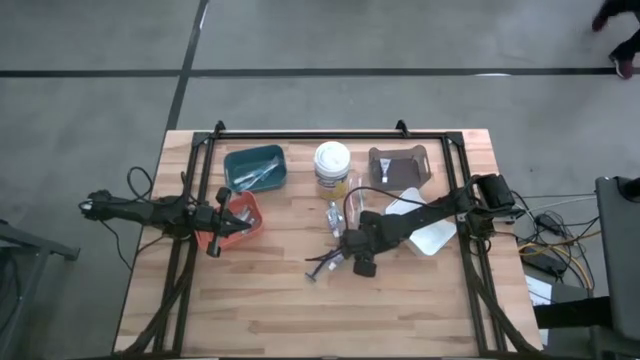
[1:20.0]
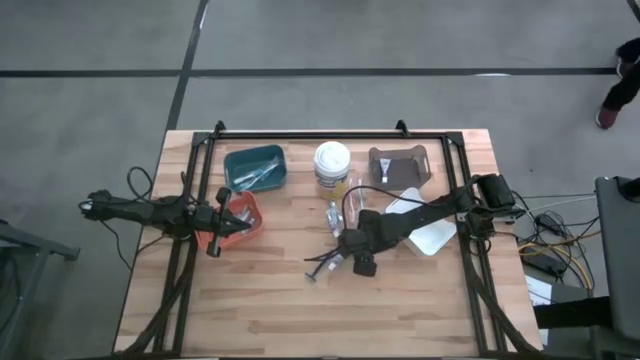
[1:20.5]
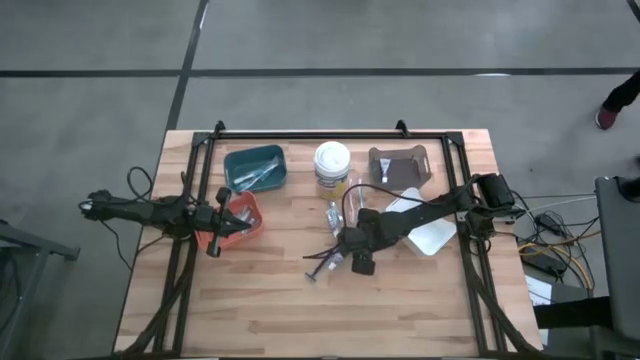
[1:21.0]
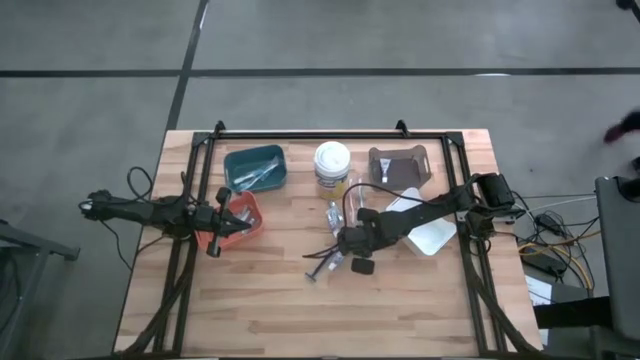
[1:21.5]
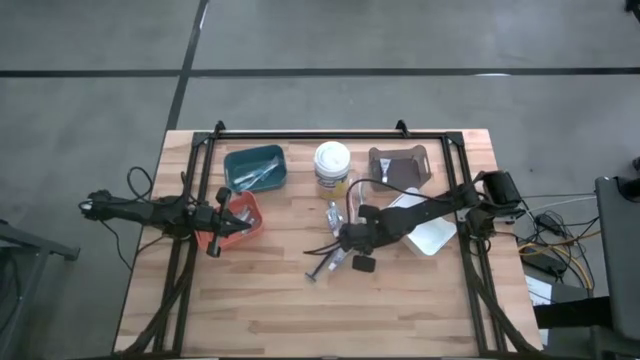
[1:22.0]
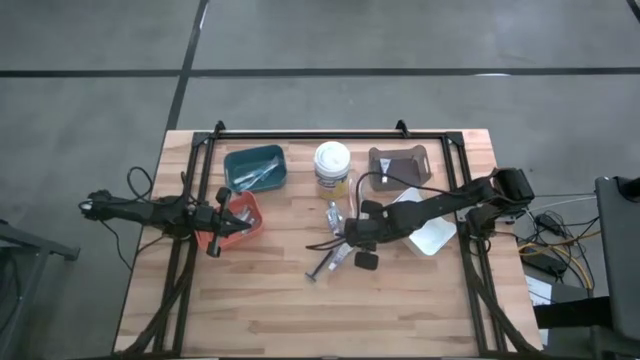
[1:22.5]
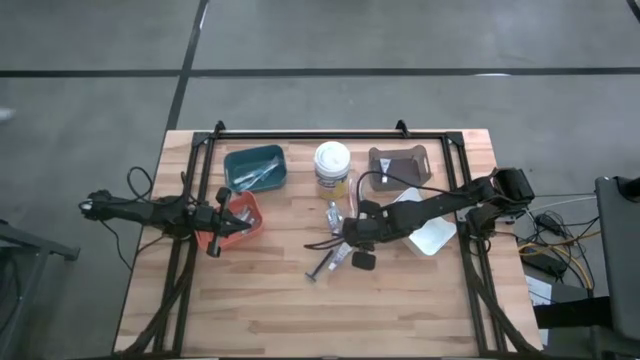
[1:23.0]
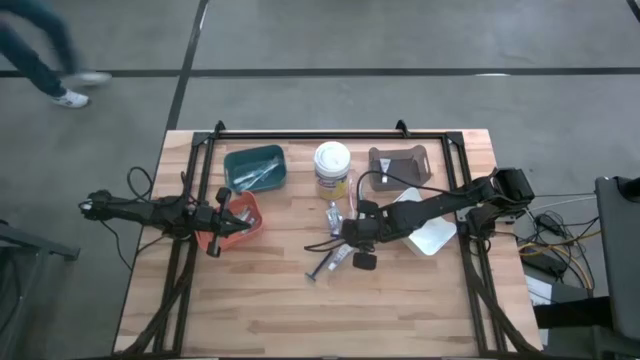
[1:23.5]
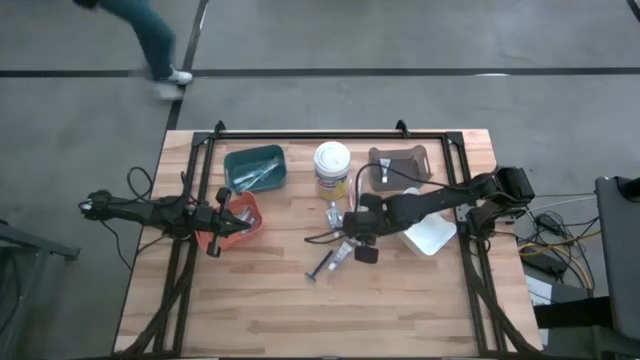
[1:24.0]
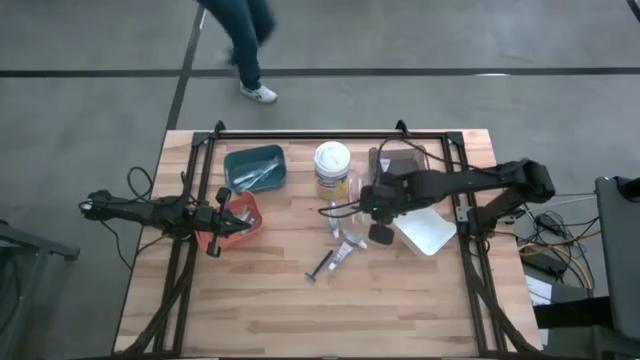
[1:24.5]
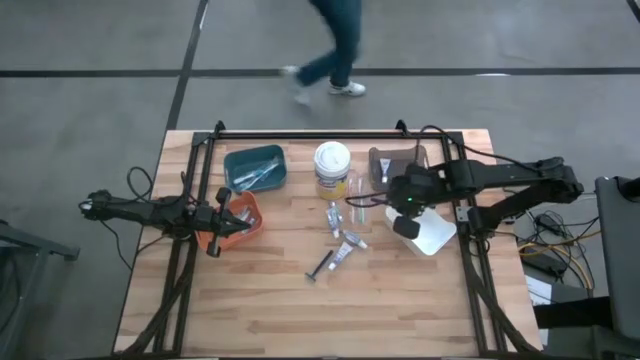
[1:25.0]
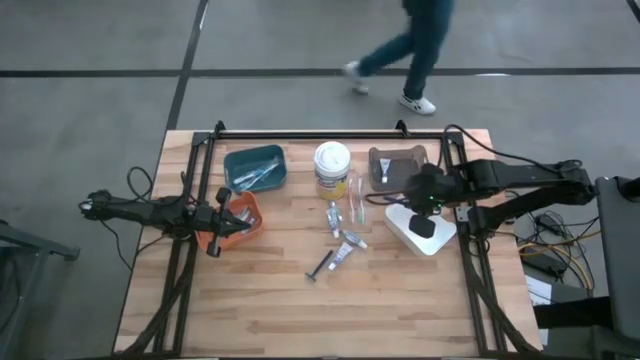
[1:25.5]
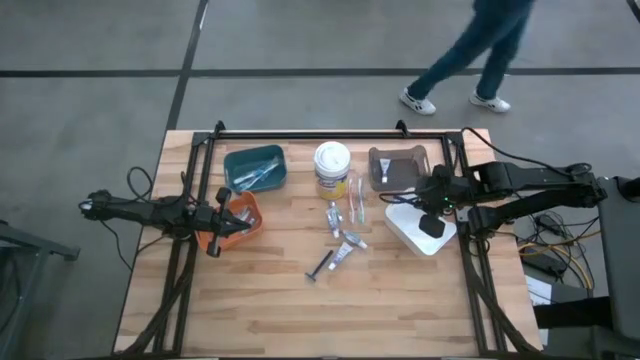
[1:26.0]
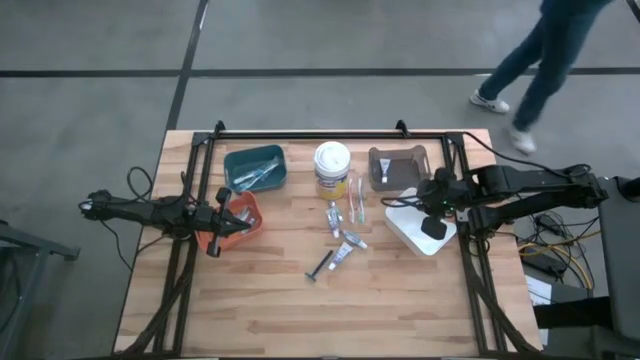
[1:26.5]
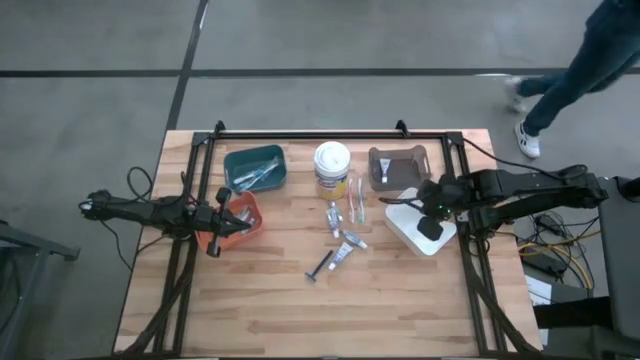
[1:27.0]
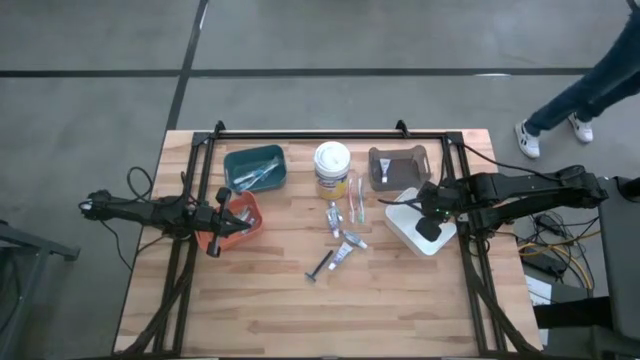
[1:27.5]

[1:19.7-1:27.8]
Task: Pick & Place Travel size toiletries
Put the top razor into the white bin

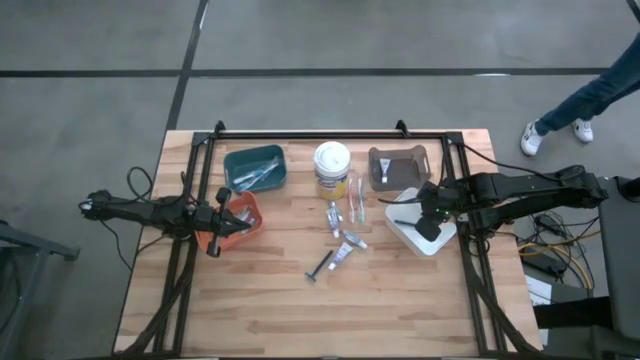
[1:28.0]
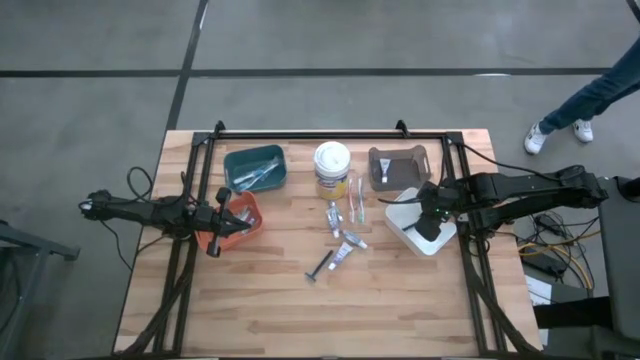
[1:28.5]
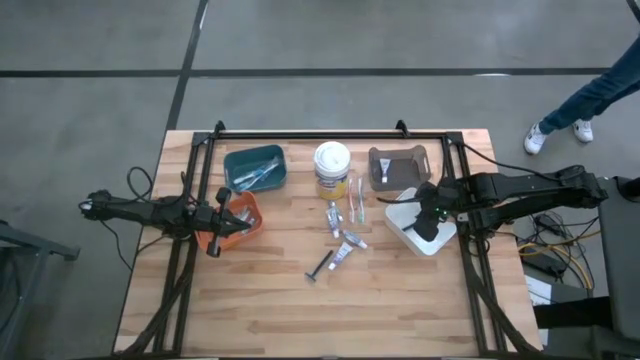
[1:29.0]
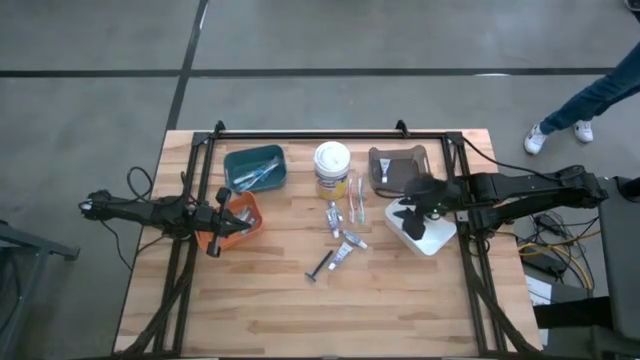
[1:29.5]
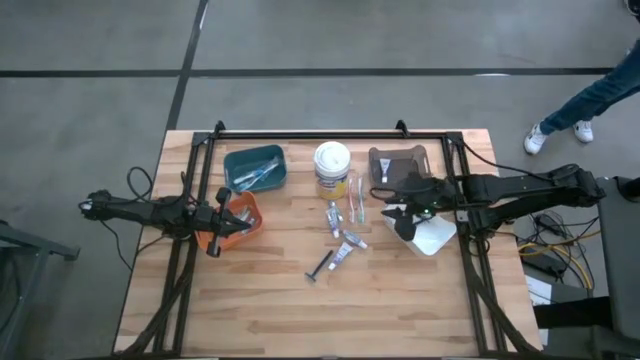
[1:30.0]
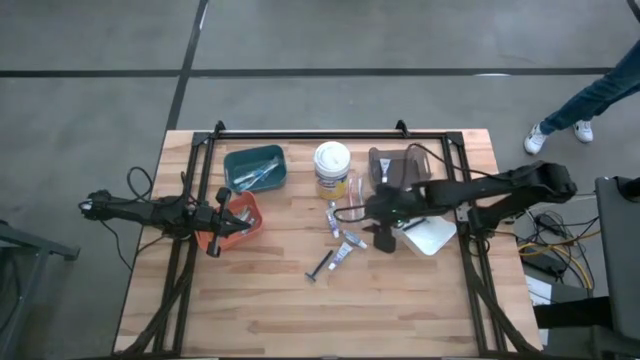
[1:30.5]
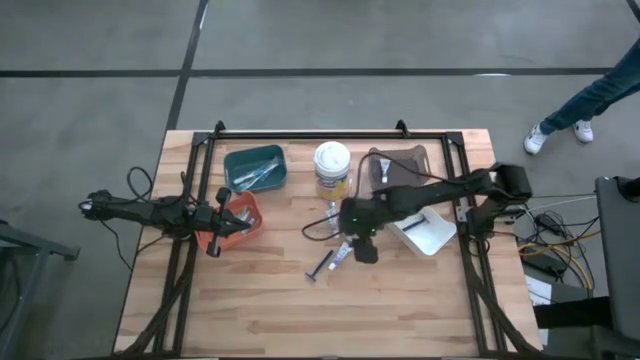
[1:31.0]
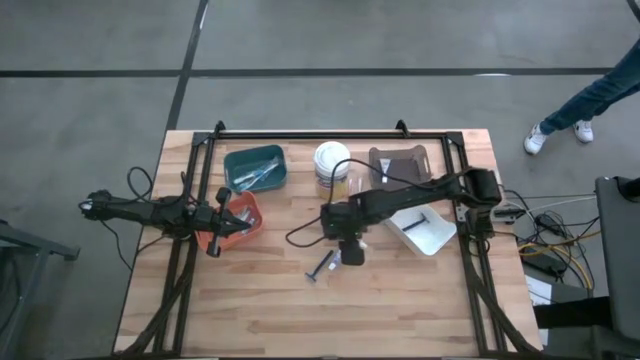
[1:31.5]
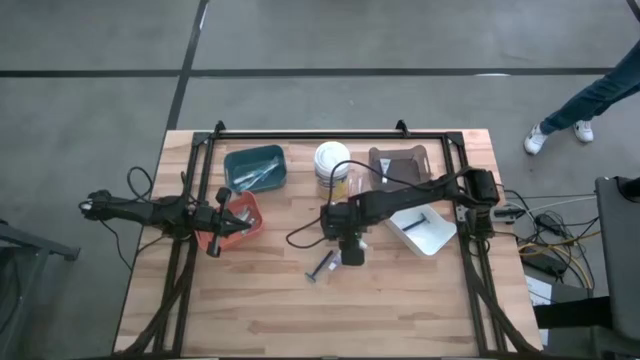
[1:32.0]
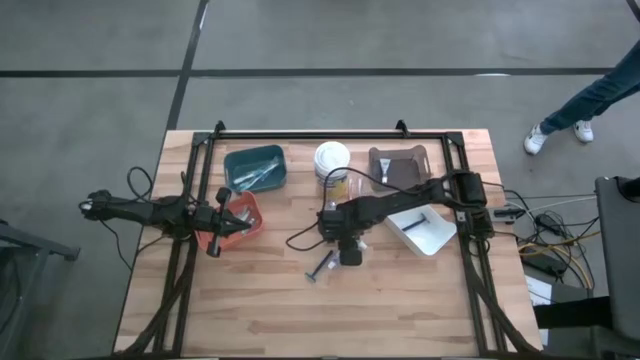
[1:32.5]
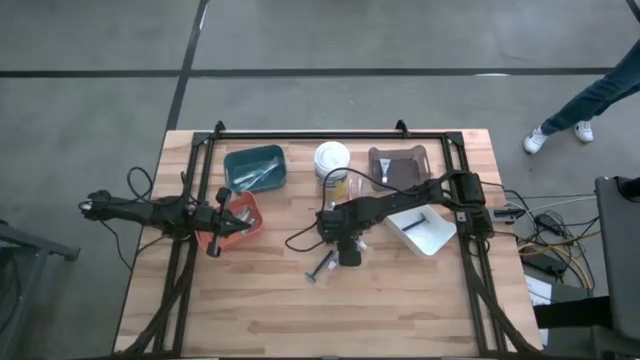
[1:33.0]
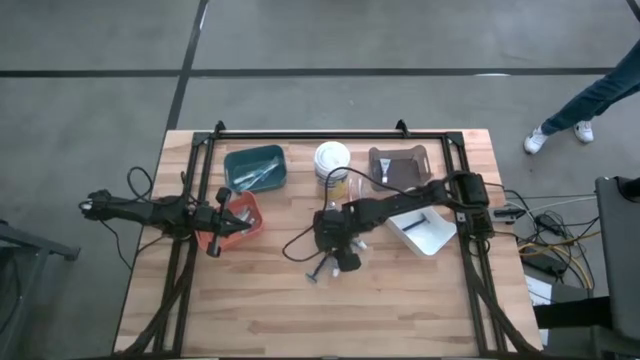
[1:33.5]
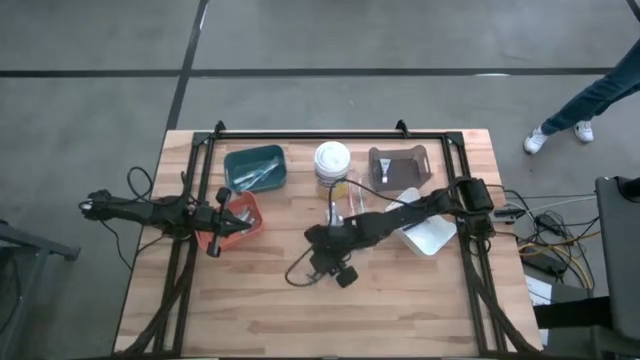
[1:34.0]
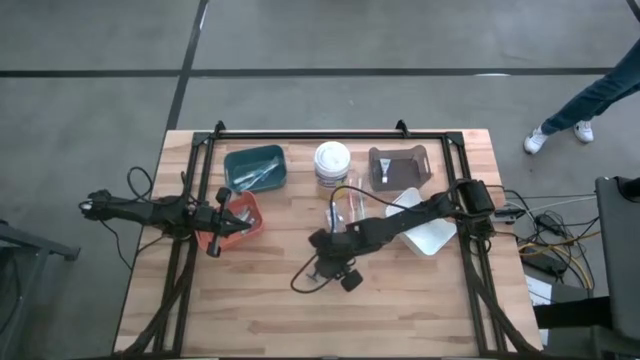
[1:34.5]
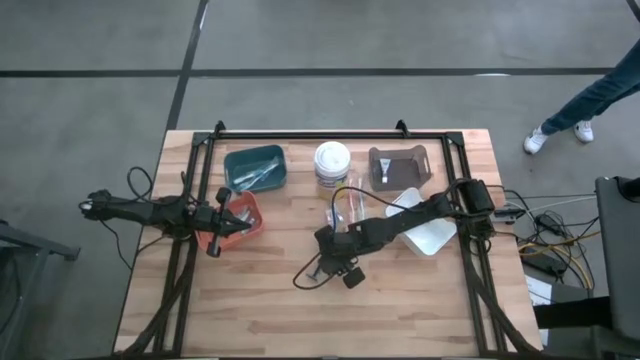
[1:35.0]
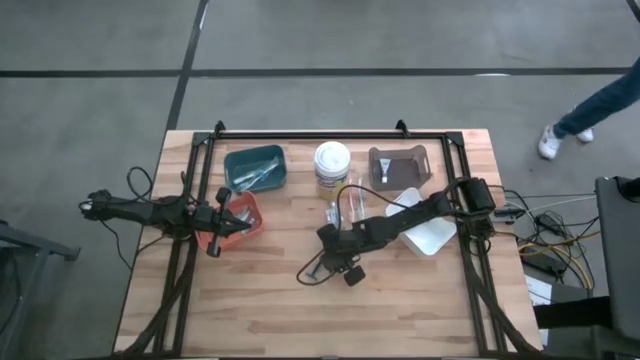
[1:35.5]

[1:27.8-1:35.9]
Put the razor into the white bin

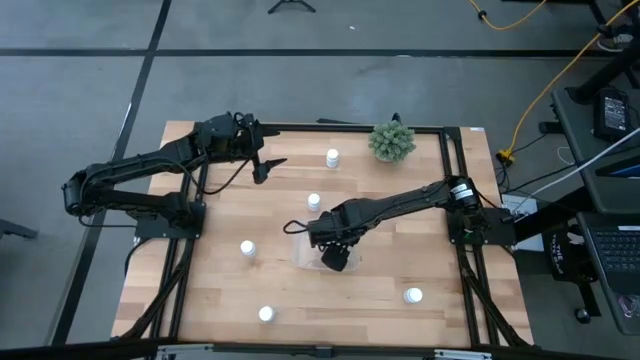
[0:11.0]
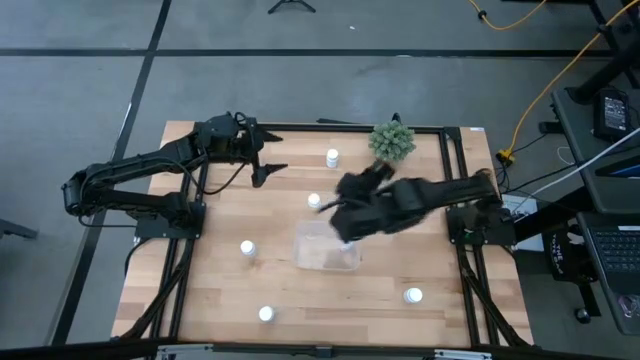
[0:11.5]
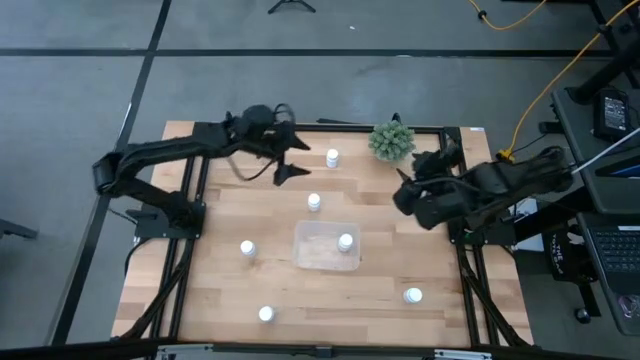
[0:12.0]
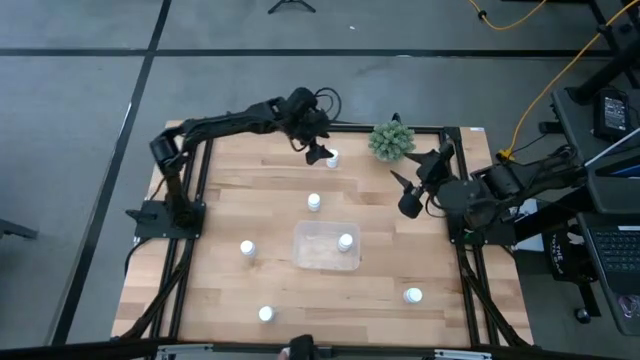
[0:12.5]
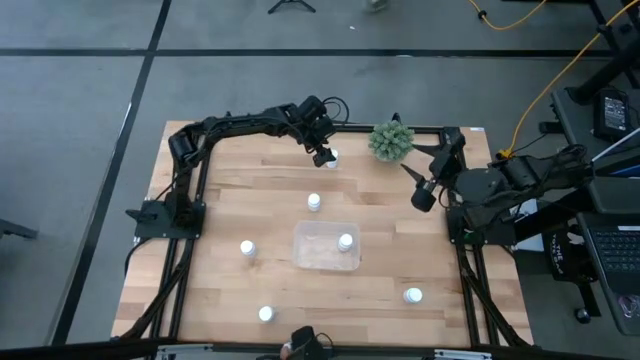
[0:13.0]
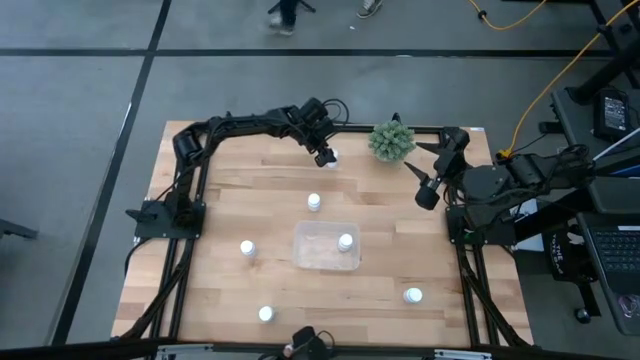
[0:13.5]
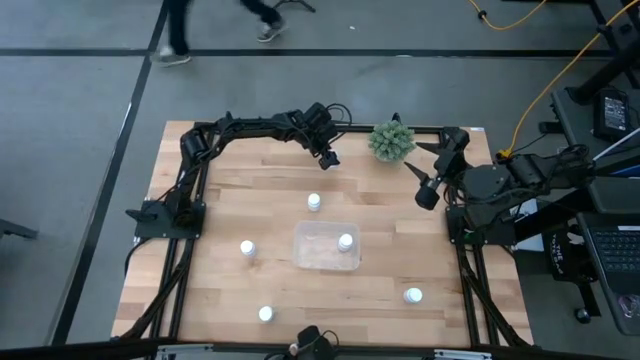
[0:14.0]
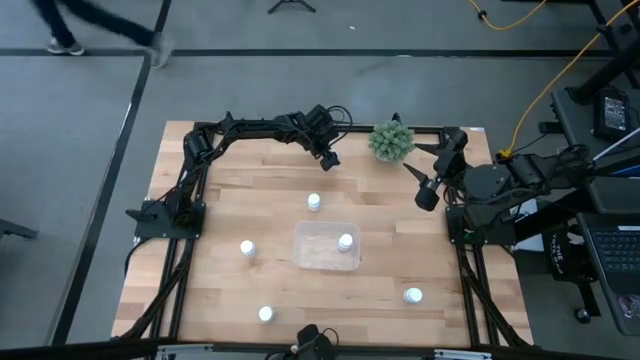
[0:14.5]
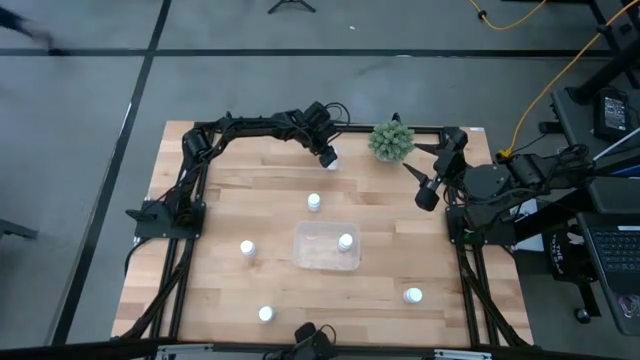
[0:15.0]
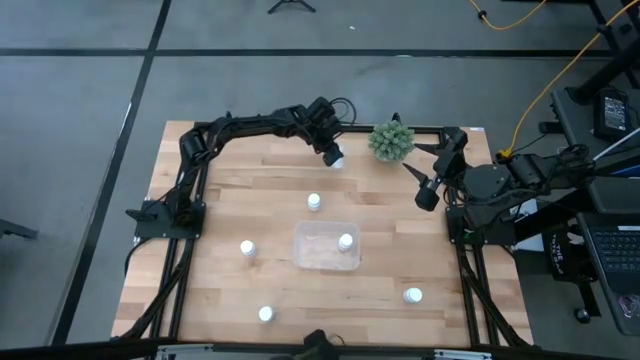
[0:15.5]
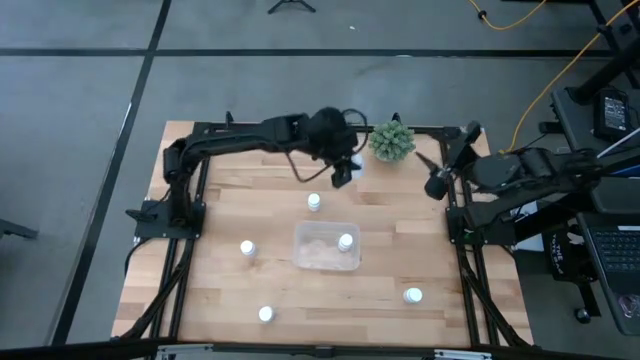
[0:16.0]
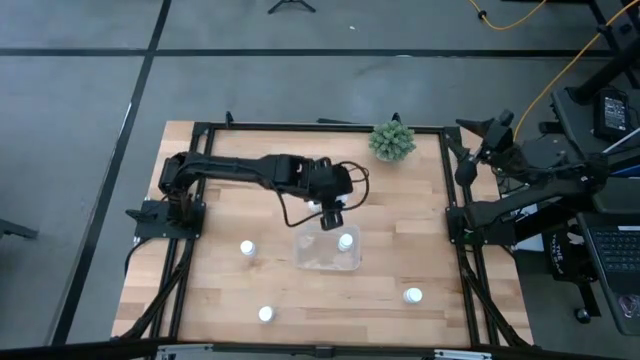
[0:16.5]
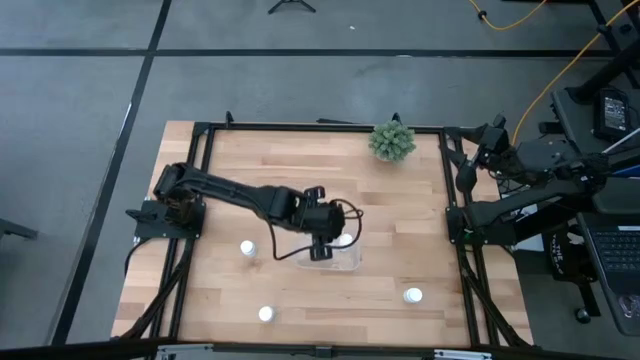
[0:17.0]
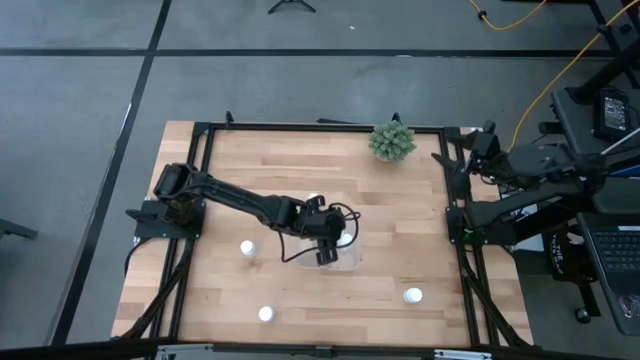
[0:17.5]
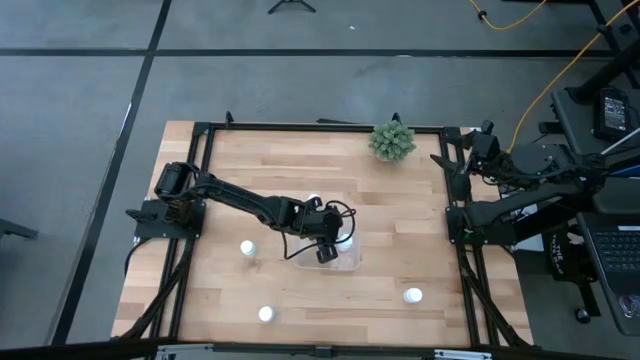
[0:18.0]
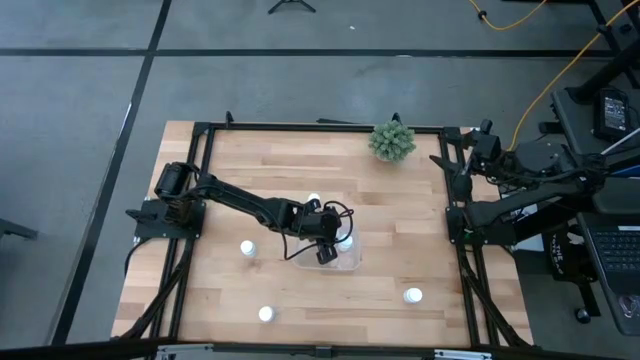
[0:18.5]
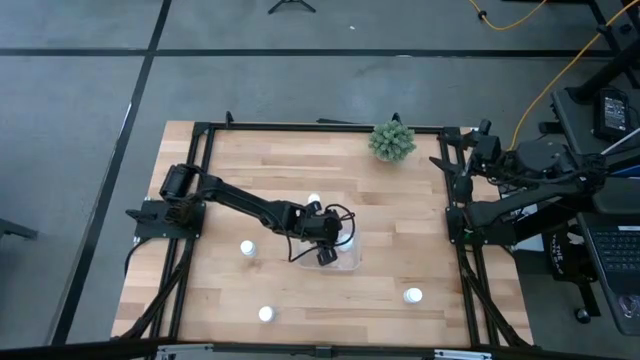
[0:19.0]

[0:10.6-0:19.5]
Task: Pick and place pill bottles into a basket
Put the white pill bottle into the transparent bin
